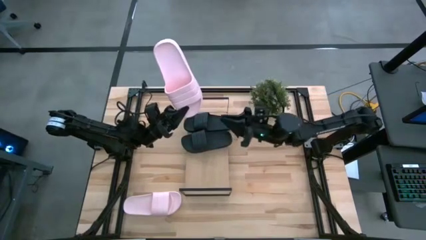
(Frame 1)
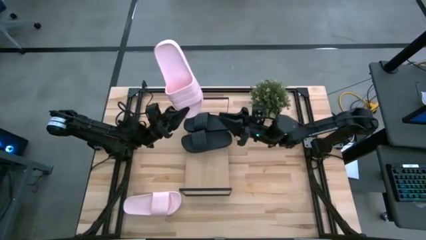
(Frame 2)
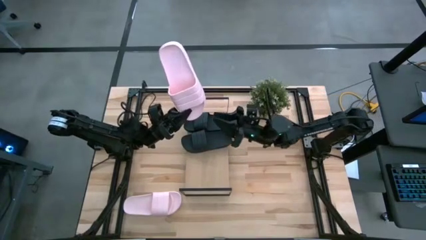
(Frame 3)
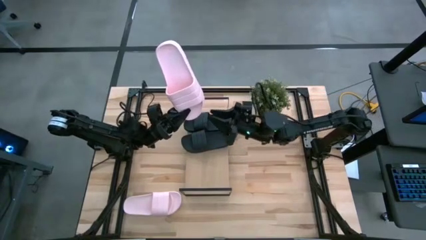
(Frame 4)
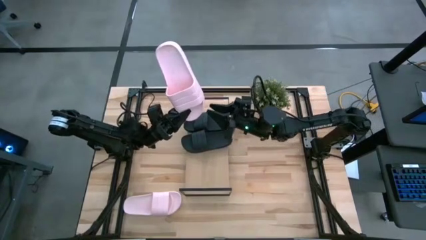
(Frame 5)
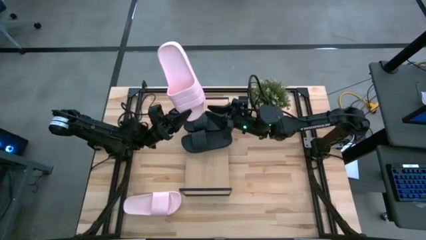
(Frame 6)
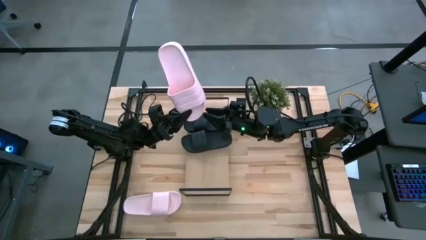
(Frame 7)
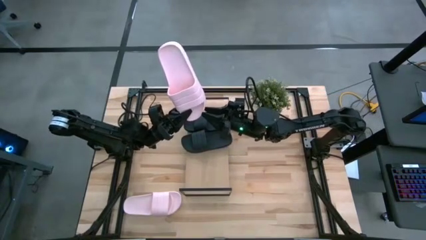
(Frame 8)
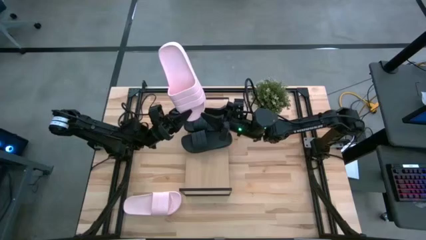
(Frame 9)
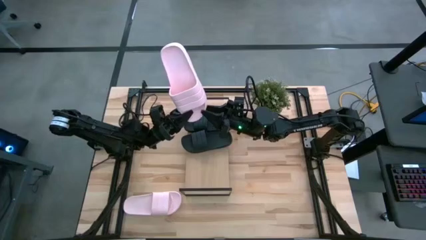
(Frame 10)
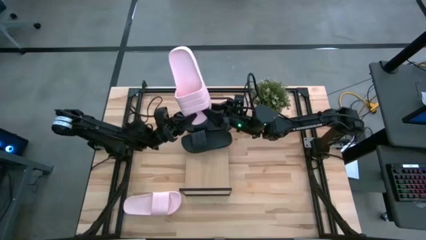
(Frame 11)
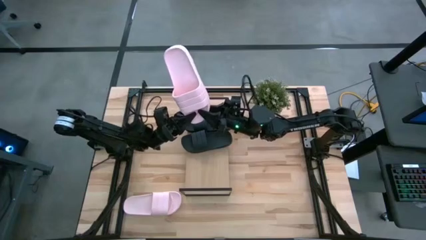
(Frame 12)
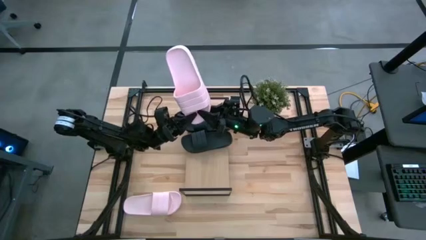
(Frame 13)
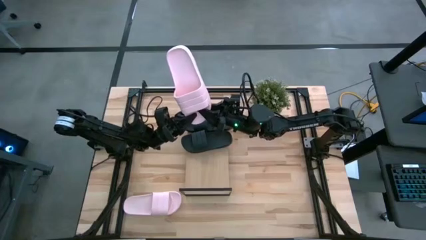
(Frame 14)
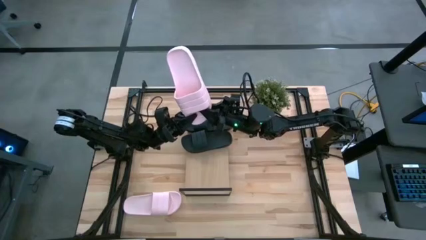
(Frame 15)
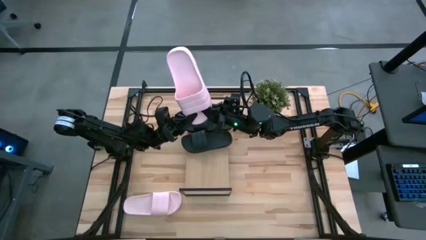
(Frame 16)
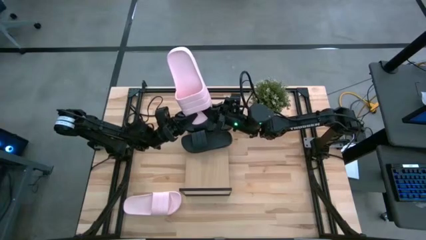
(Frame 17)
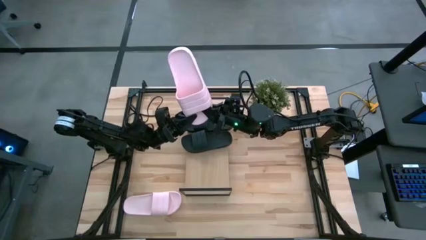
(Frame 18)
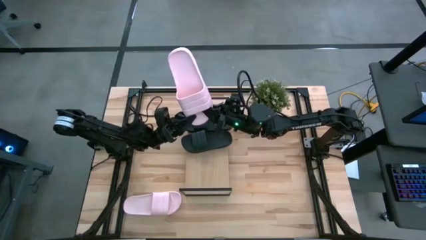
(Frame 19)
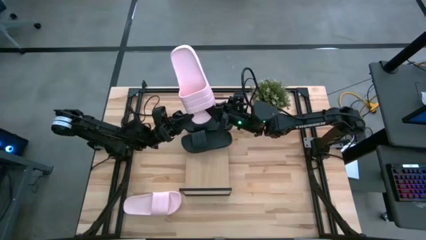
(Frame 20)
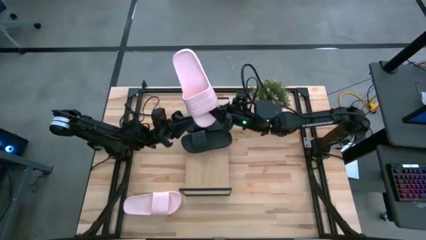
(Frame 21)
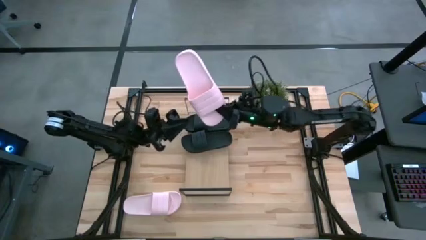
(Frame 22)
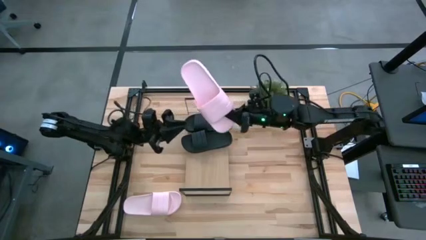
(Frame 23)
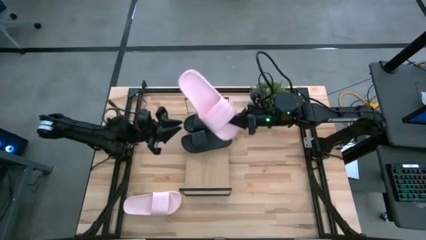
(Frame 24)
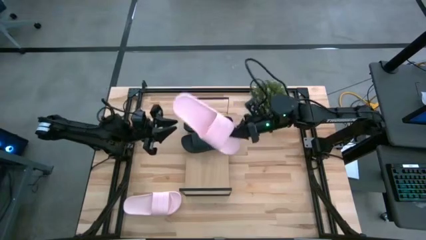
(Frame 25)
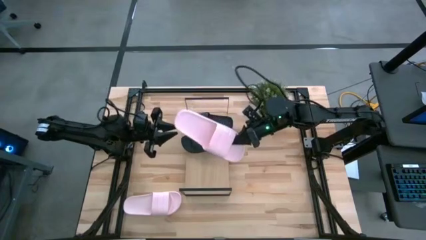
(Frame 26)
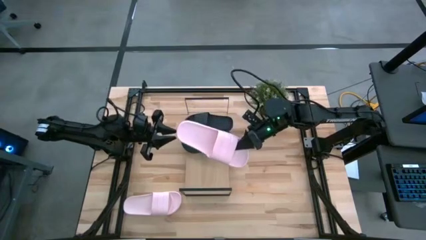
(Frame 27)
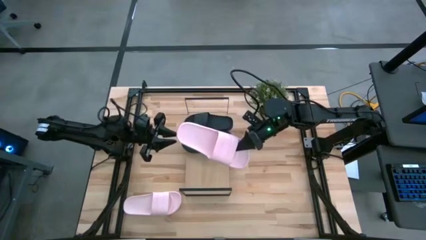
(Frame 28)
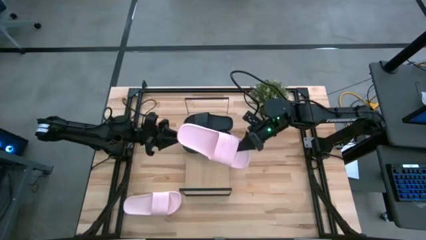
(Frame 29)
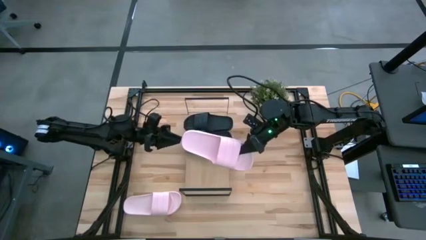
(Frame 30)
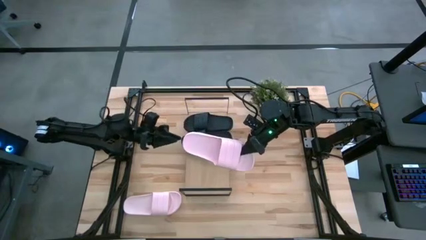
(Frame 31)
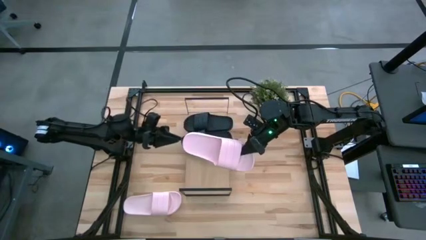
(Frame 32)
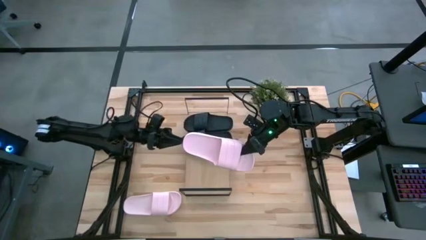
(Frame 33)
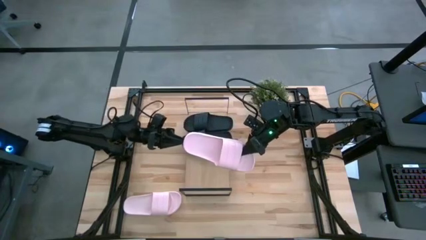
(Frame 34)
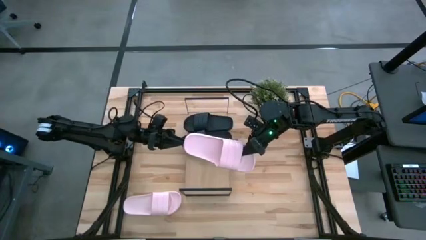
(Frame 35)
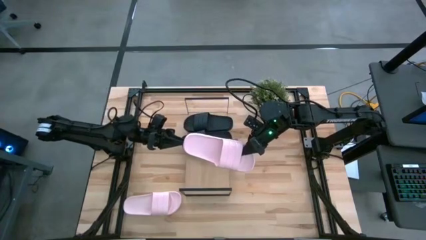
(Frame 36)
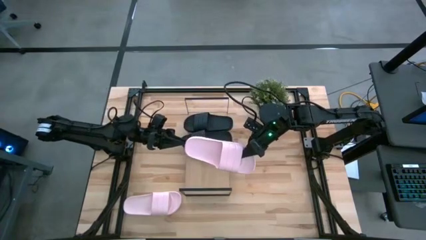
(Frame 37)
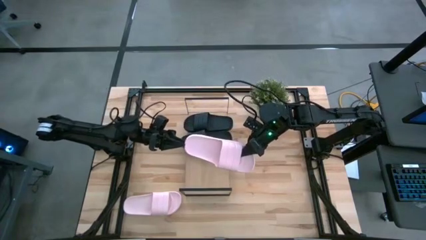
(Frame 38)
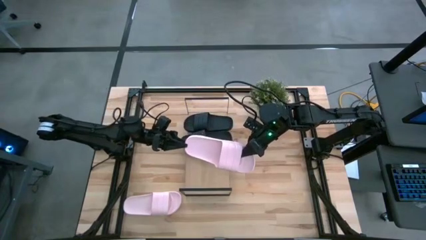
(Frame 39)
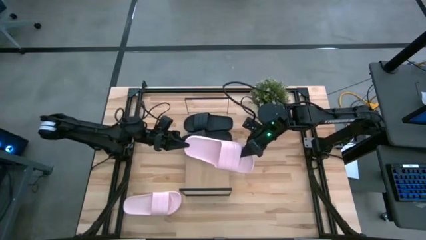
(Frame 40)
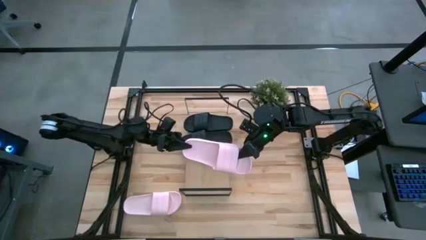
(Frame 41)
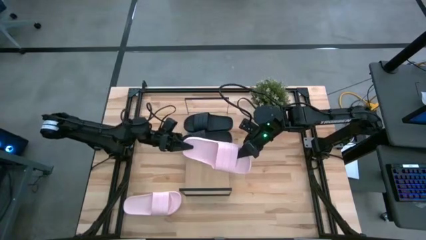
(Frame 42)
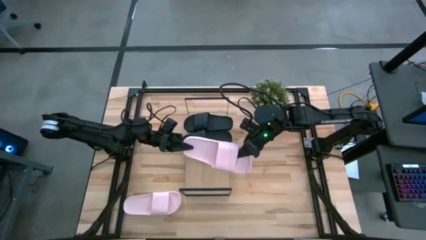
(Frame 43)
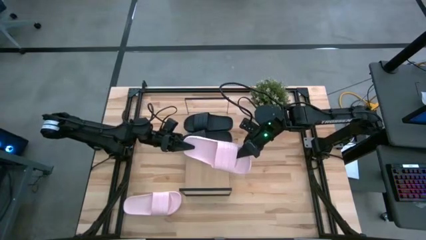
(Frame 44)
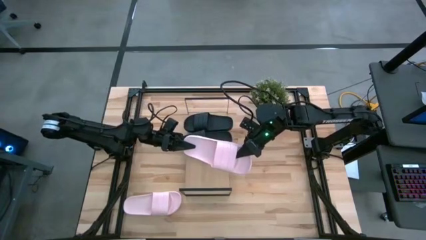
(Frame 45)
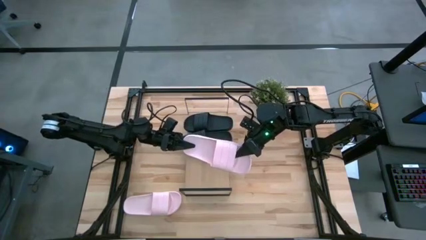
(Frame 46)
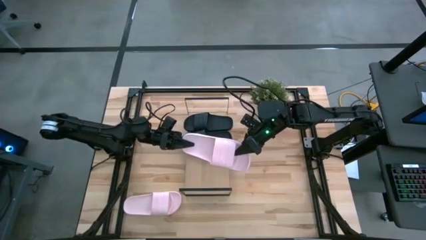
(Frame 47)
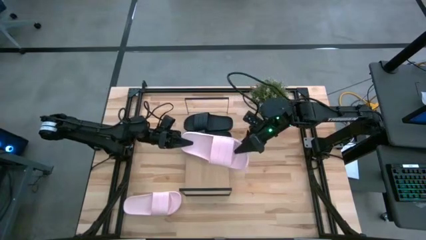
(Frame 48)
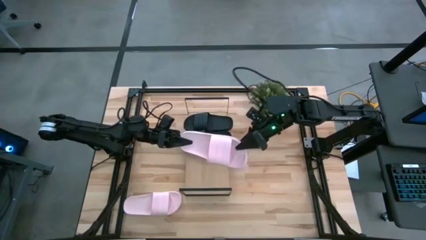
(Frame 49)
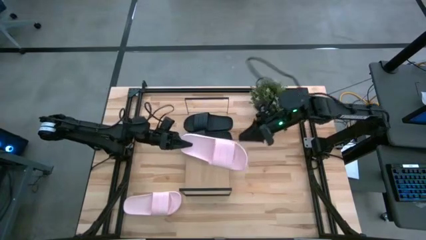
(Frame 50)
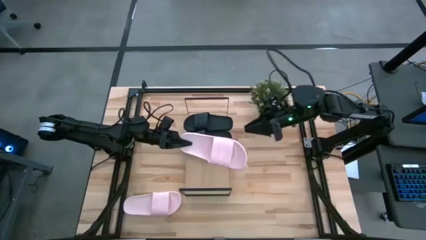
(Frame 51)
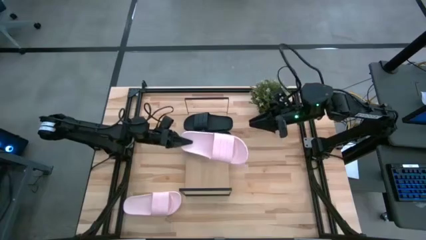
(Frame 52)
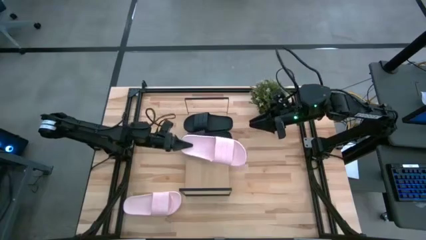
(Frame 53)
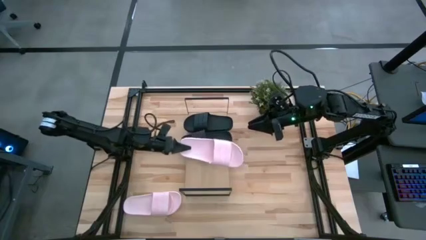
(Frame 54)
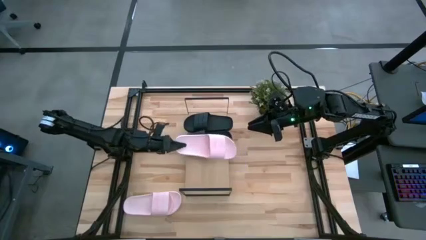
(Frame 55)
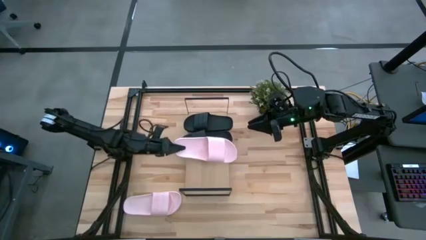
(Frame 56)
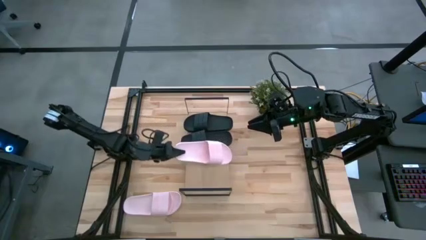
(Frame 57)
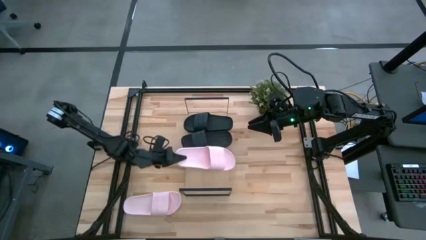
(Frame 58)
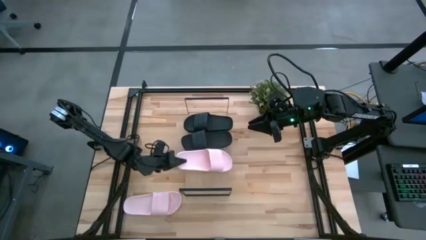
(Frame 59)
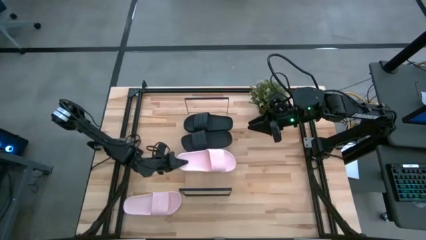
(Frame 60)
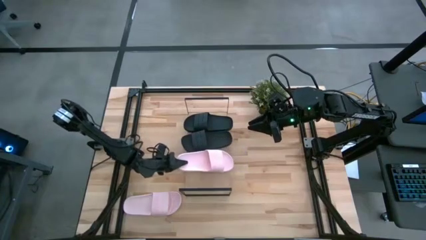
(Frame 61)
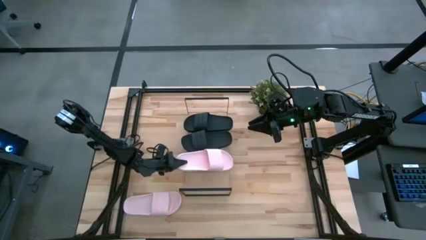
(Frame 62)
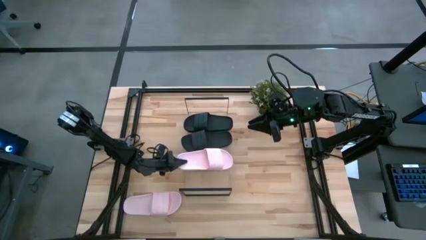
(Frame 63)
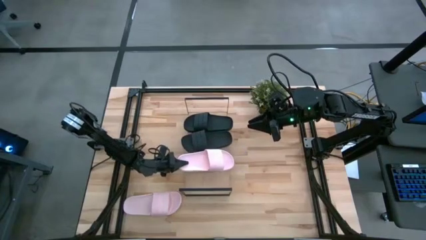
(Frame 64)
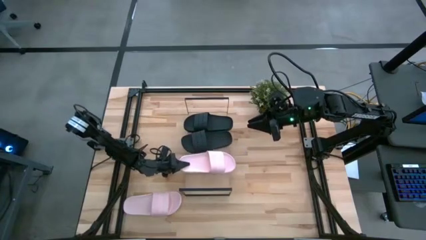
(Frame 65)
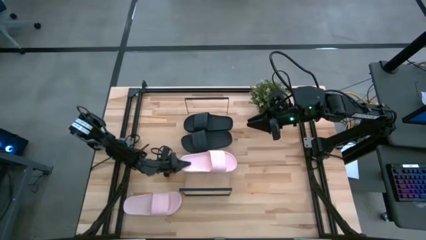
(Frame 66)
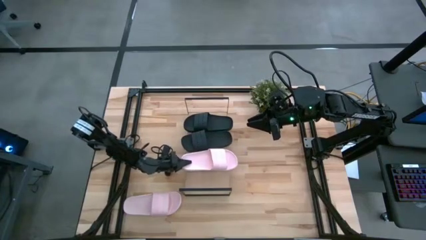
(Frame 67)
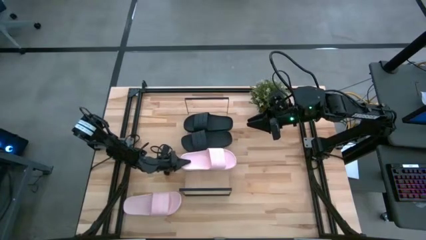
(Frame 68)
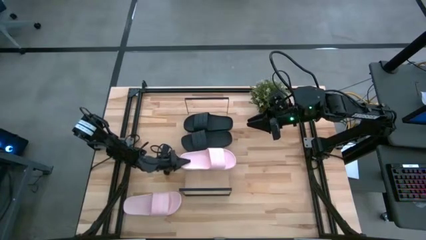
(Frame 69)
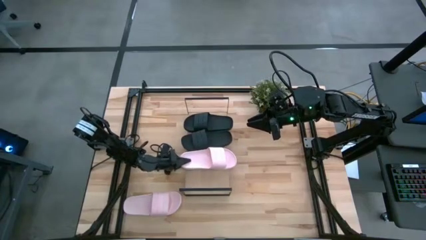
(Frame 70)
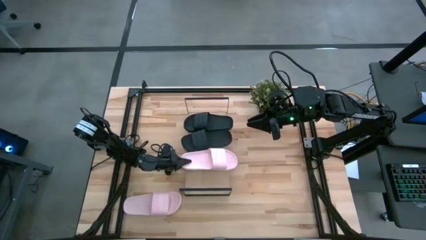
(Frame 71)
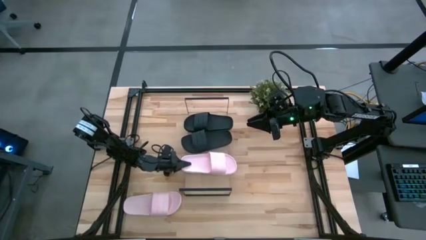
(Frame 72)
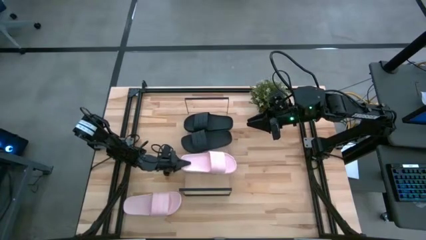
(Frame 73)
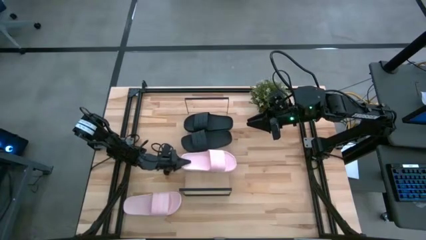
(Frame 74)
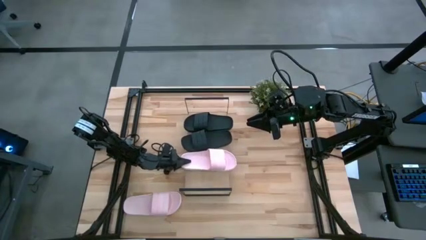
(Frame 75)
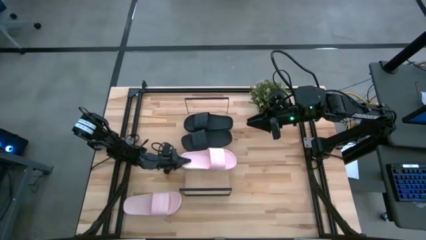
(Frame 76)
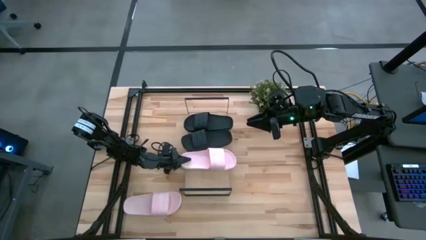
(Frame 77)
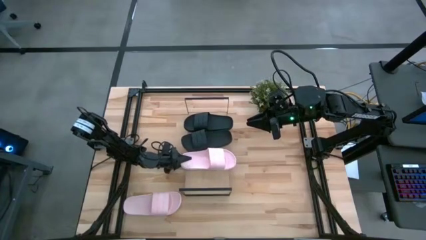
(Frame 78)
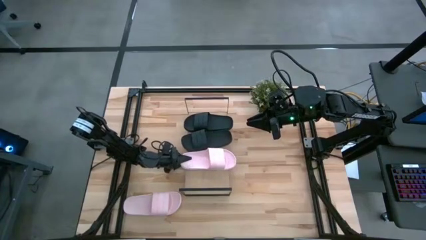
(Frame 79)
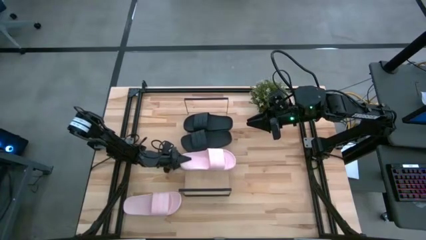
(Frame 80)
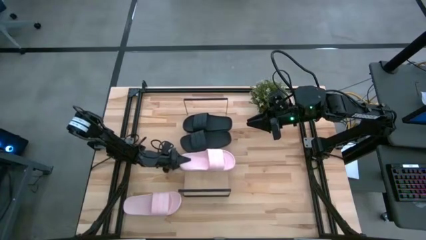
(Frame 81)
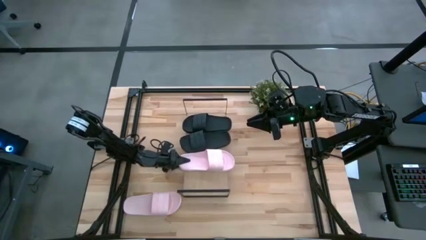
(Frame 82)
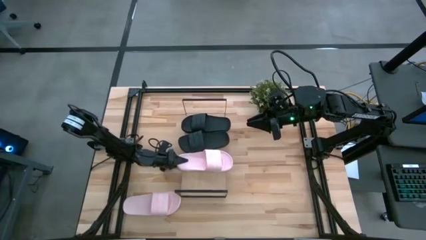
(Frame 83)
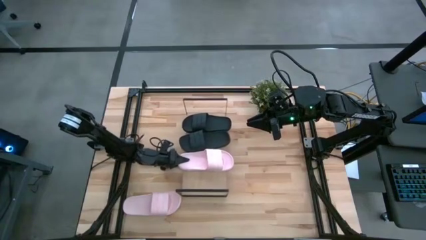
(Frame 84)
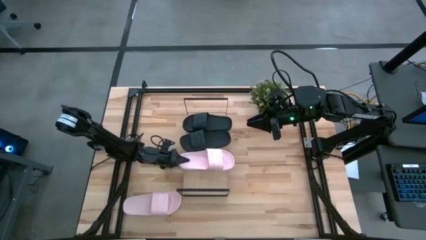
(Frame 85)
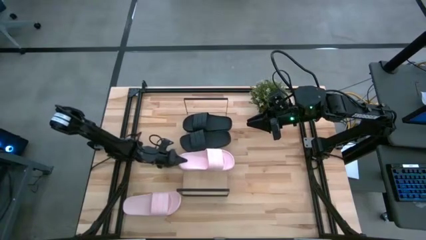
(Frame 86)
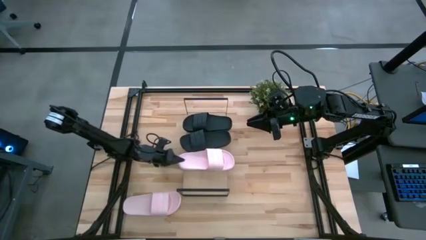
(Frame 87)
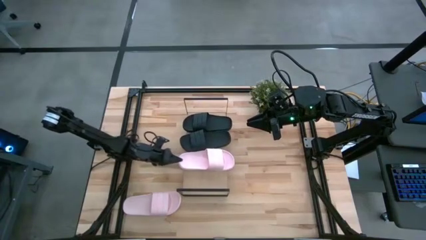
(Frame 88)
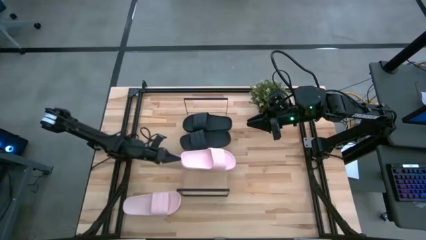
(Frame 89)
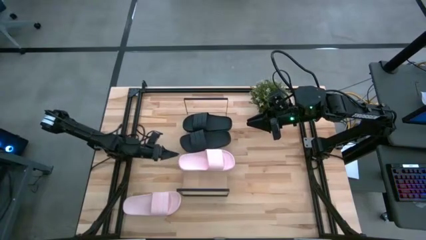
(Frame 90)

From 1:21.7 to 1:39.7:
Task: Pick and place slides into the shelf
Put the right light pink slide on the shelf
